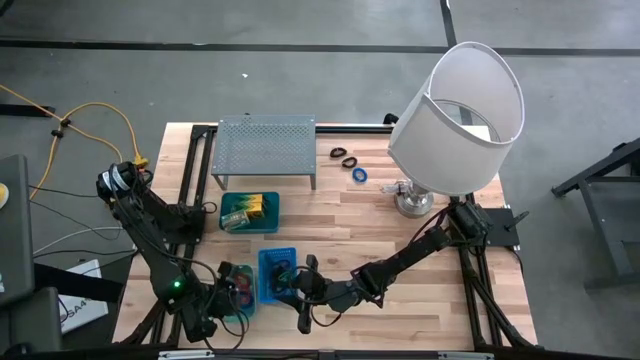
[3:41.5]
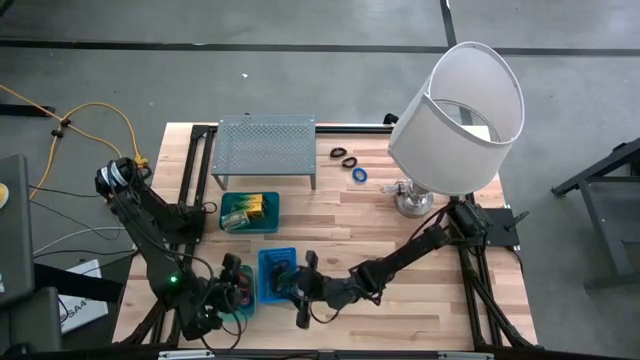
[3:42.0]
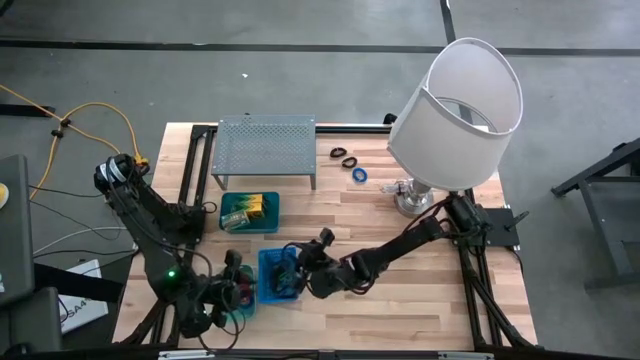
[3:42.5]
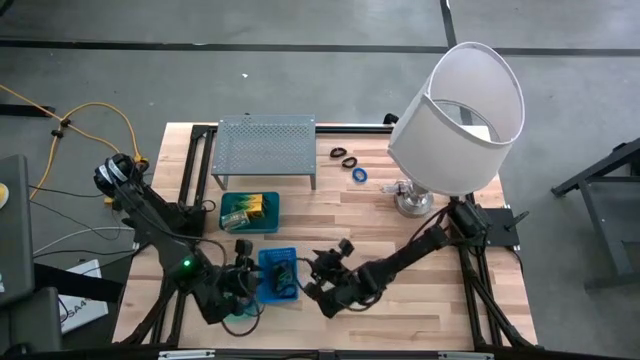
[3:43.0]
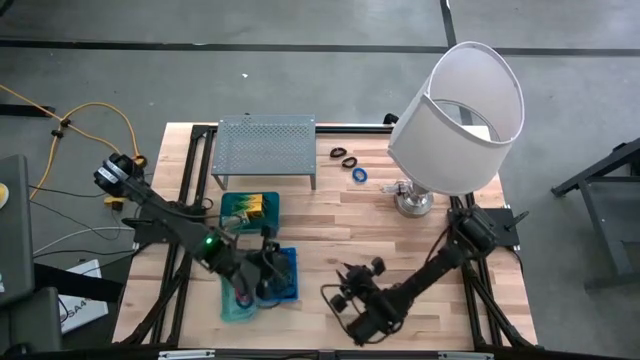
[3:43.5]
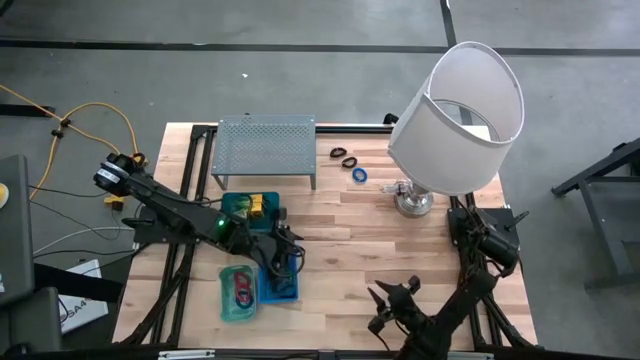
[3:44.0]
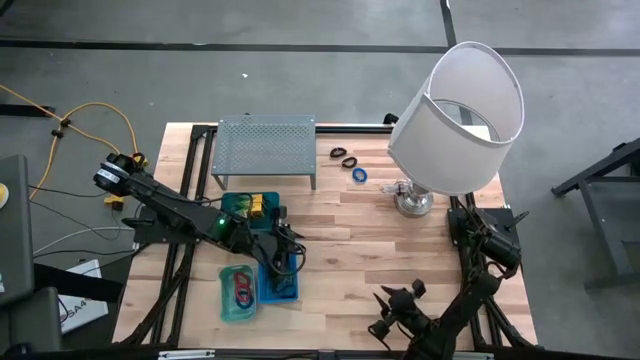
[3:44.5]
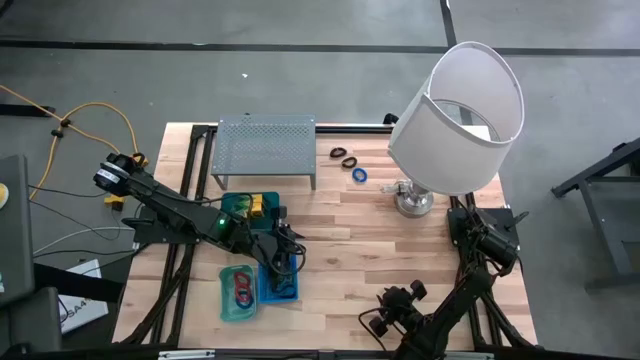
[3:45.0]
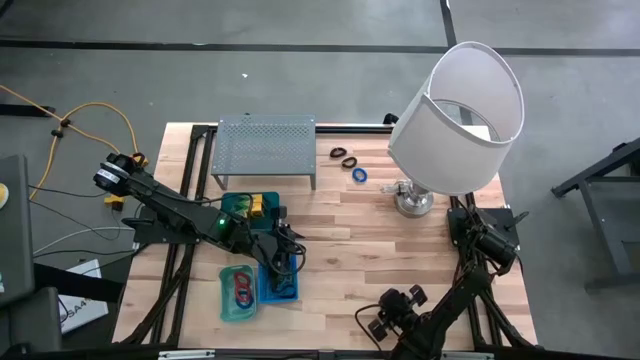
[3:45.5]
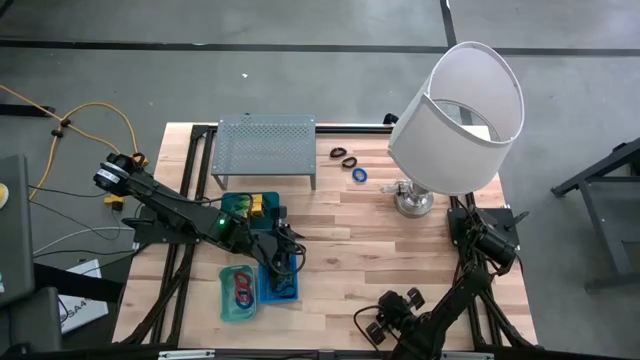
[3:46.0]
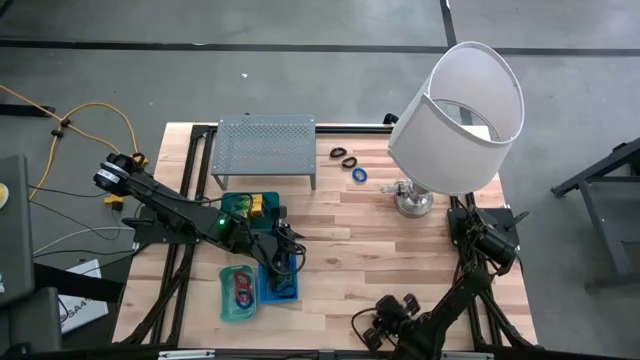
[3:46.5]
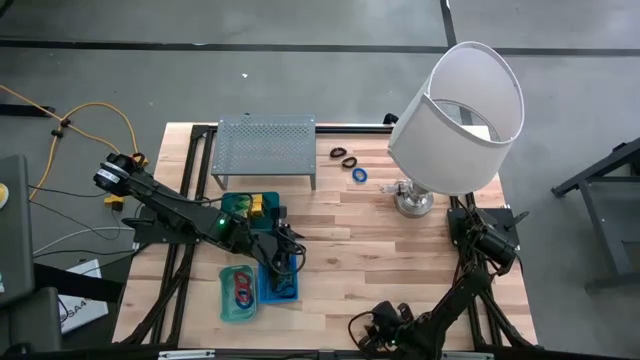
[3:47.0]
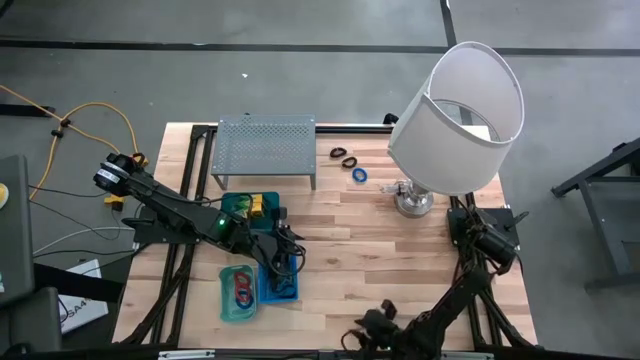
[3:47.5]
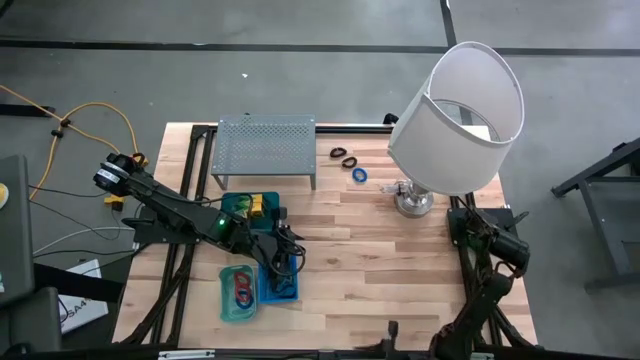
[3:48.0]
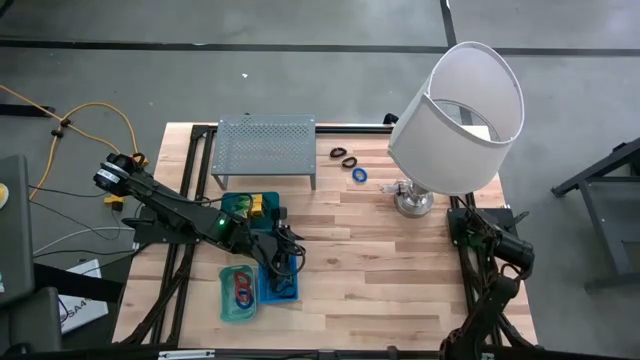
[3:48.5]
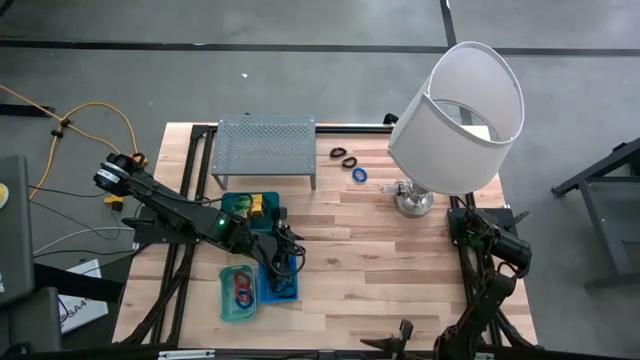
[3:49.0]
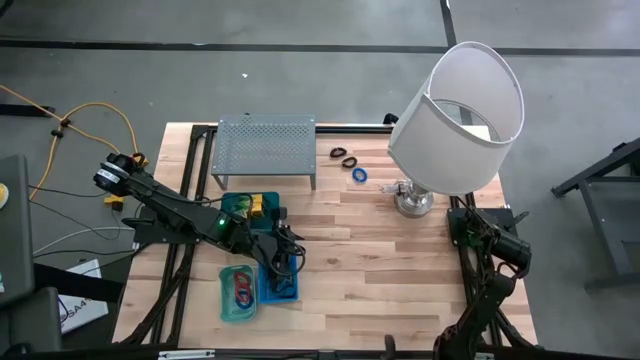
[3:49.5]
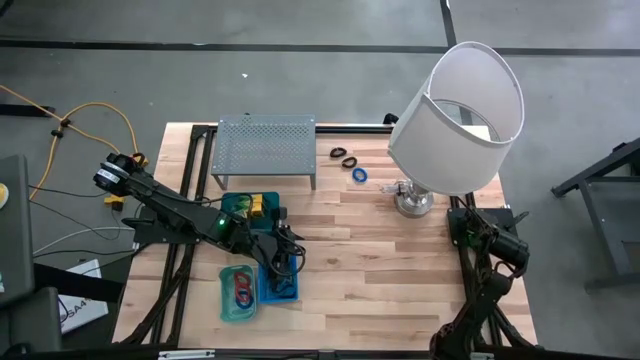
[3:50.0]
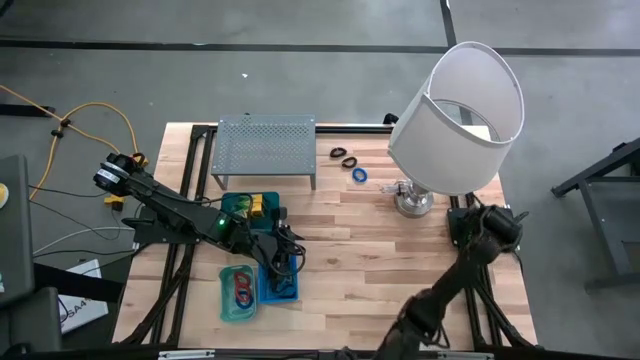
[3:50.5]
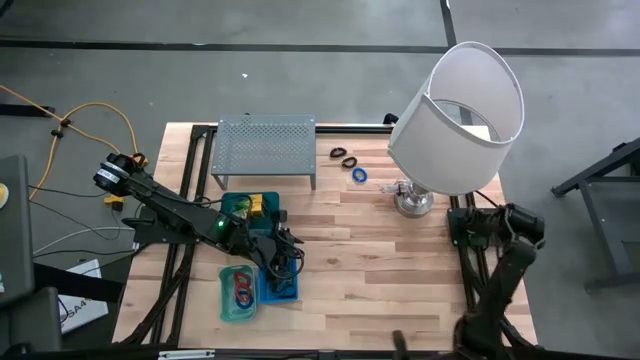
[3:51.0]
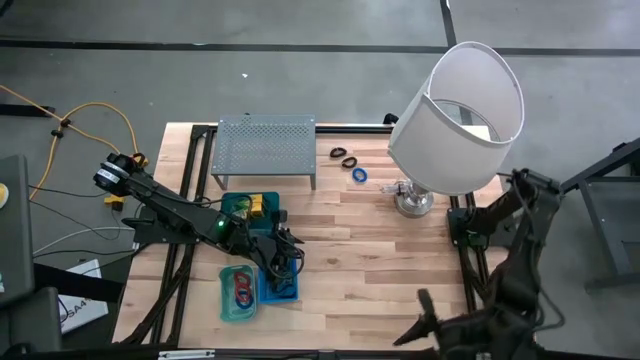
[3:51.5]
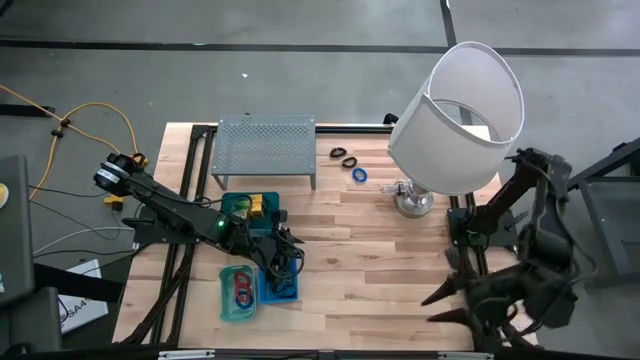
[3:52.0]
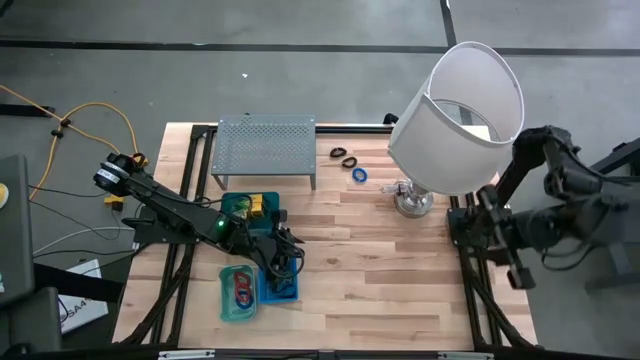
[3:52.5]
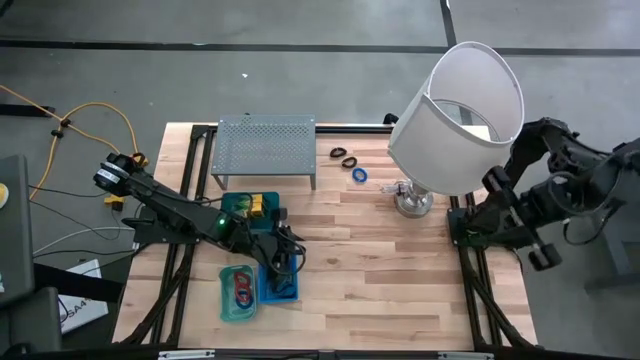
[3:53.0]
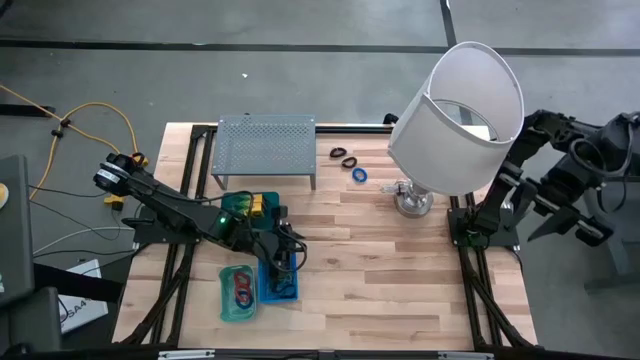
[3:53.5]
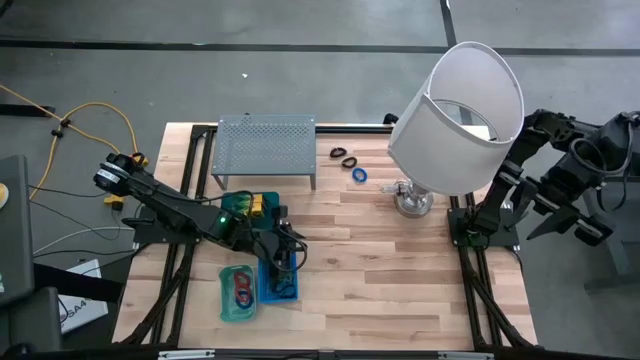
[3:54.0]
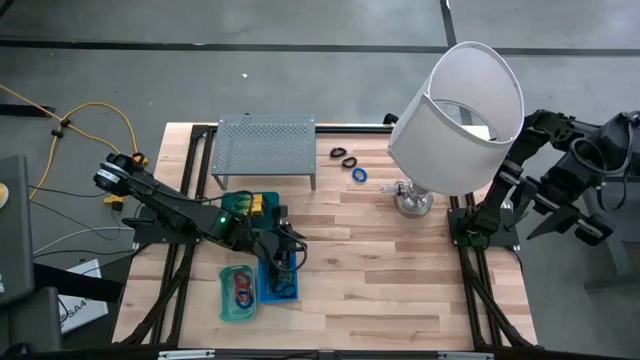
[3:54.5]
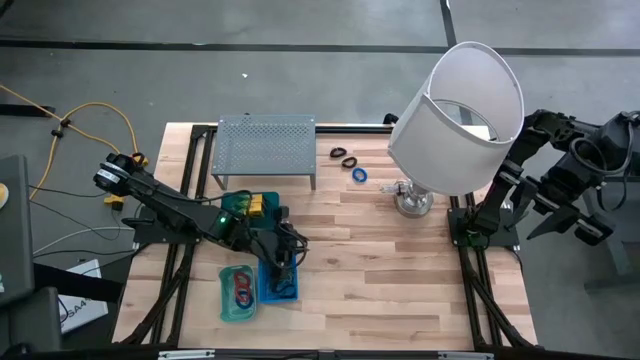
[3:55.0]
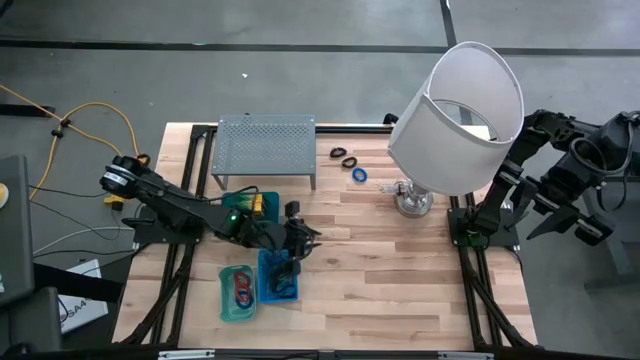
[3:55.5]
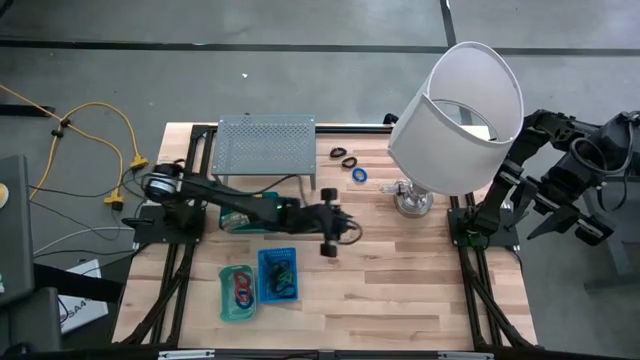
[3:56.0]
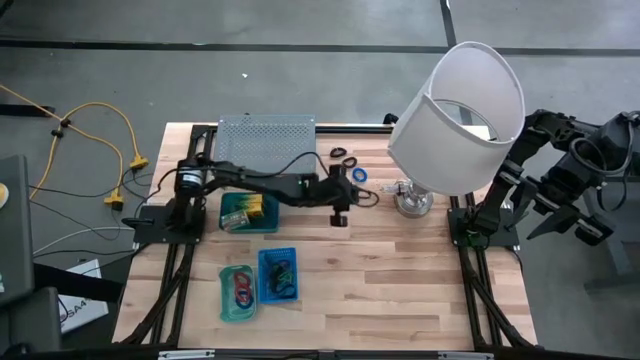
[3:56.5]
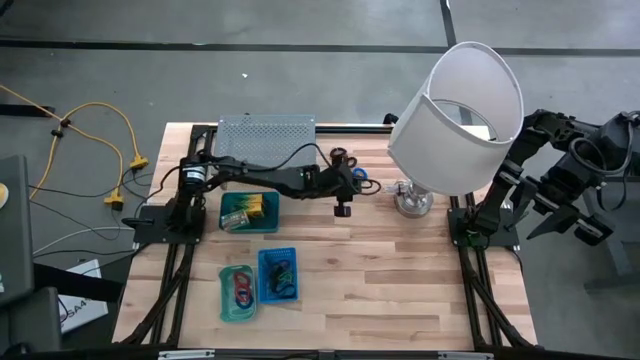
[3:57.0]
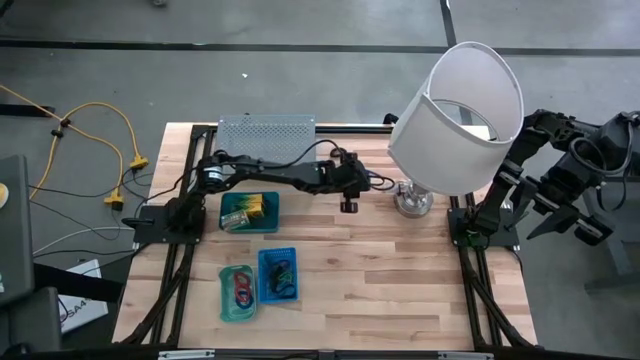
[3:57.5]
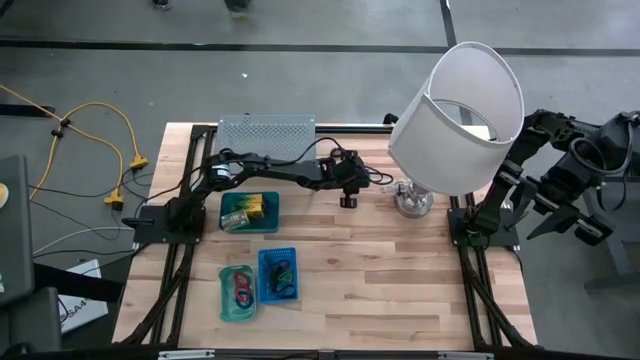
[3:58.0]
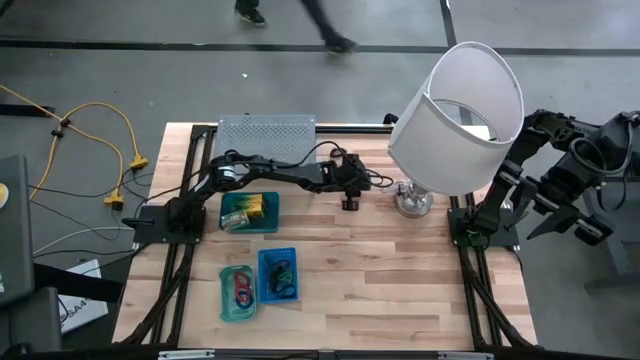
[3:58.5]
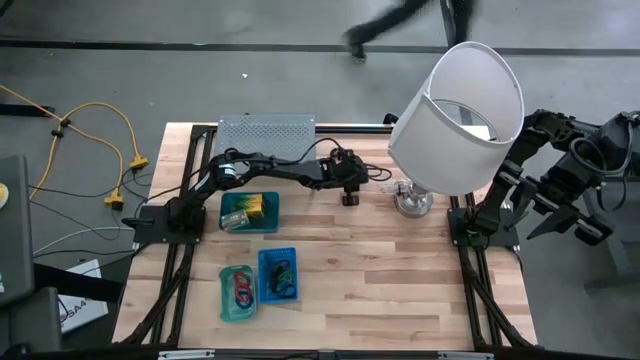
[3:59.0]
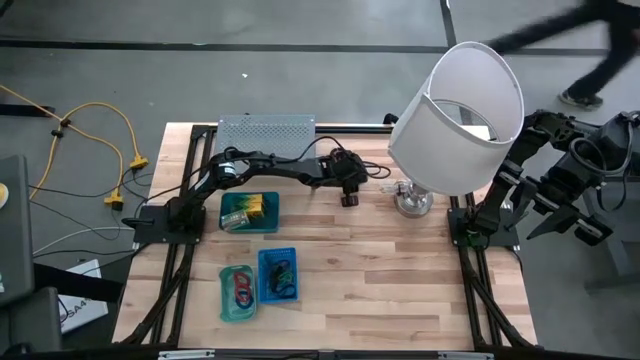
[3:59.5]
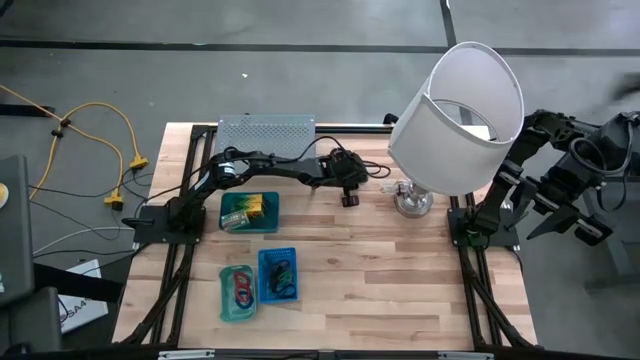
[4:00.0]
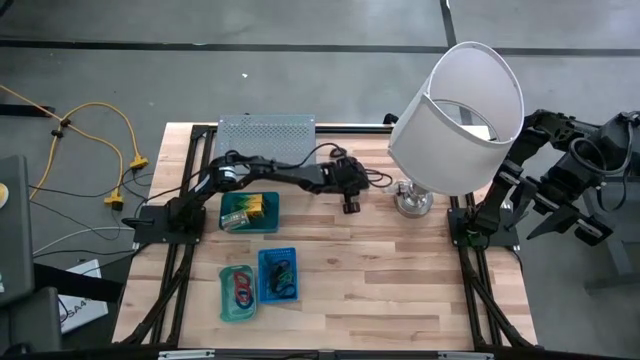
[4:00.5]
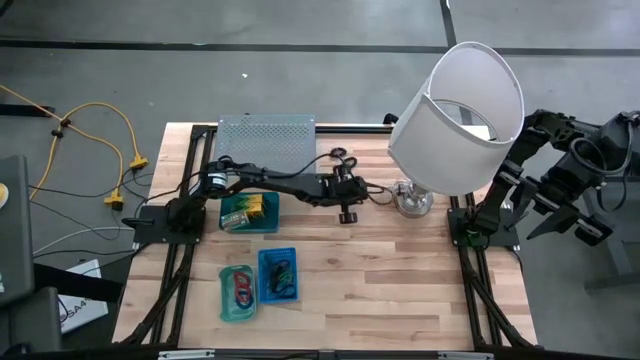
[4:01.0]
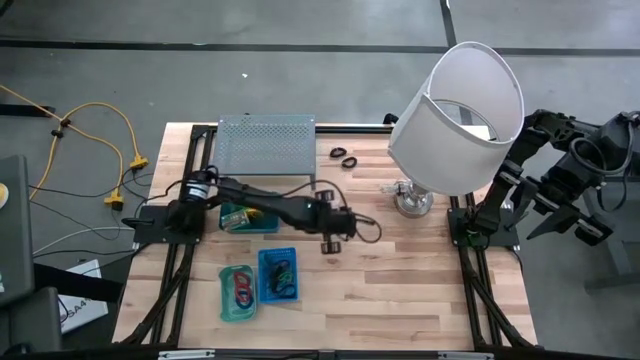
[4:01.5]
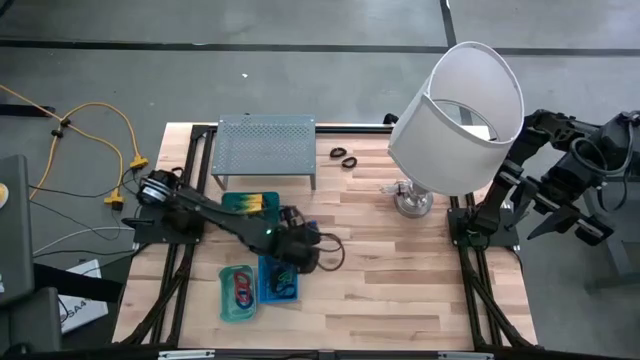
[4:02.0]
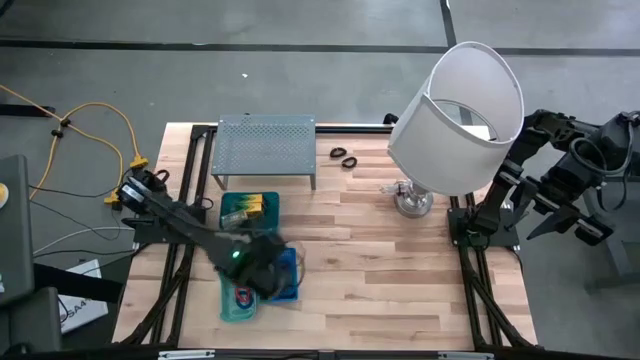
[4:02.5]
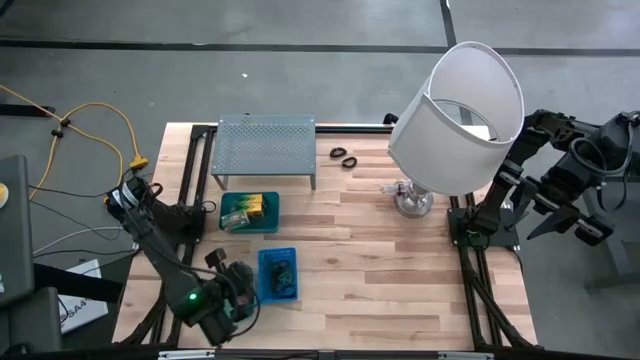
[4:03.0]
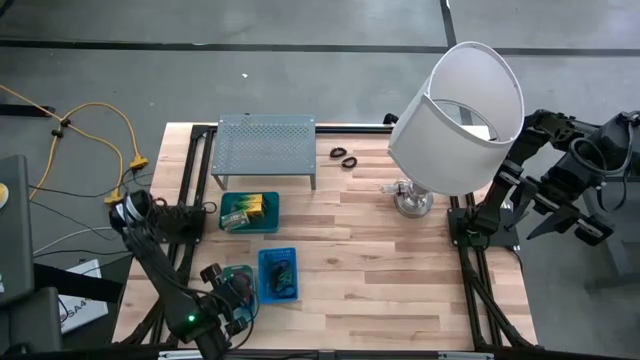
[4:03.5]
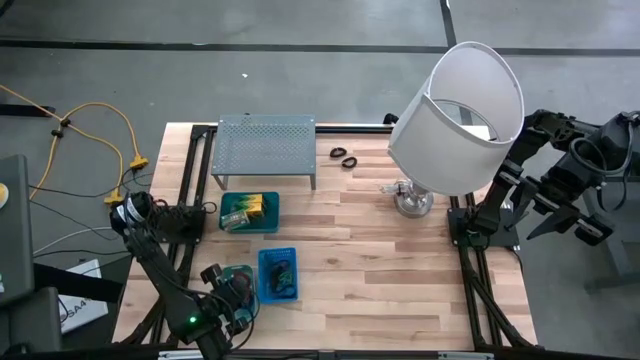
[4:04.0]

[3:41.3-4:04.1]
Task: Pick & Place Office Desk Supplies
Put the blue spring keychain into the green bin
